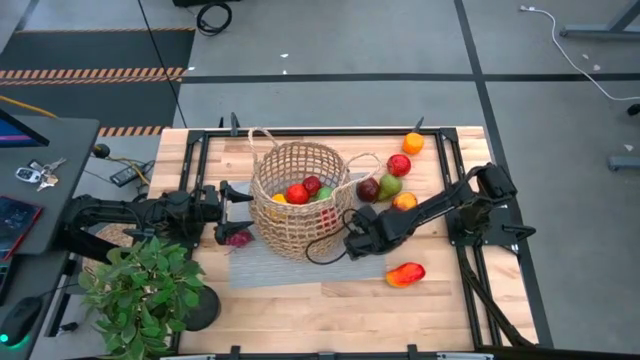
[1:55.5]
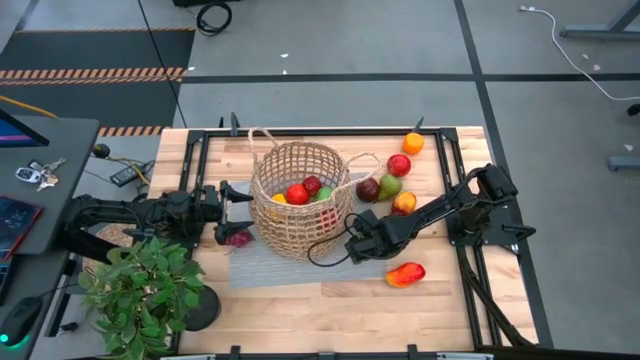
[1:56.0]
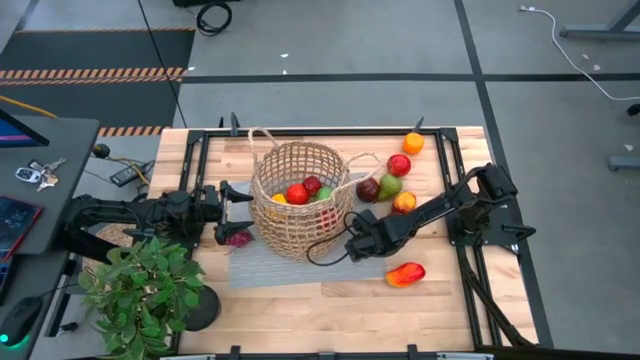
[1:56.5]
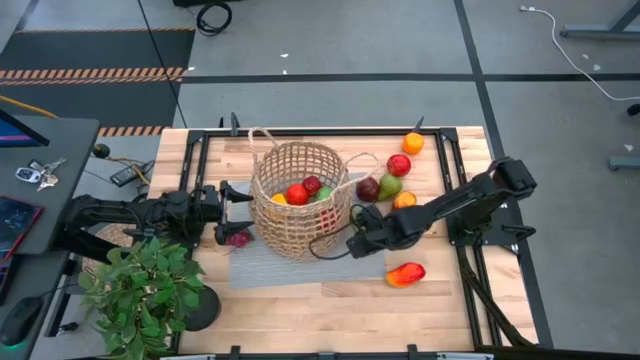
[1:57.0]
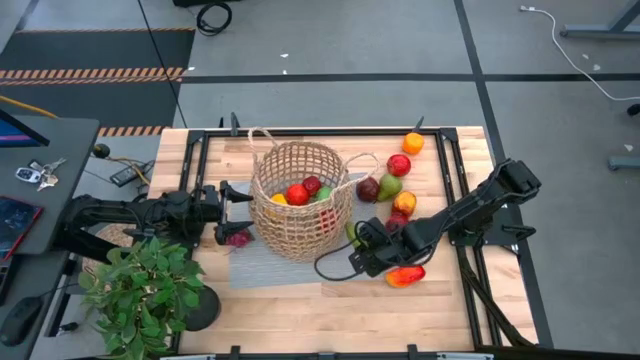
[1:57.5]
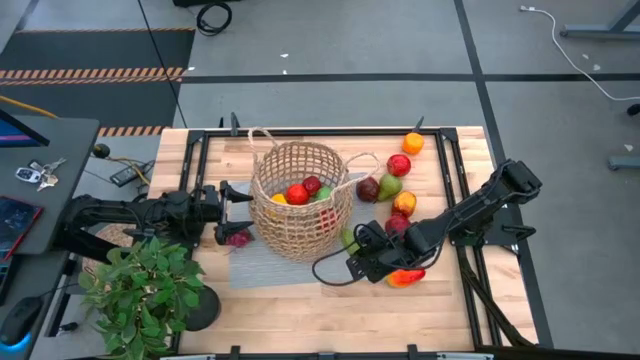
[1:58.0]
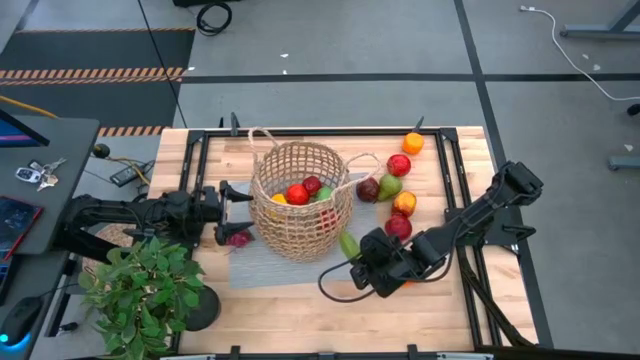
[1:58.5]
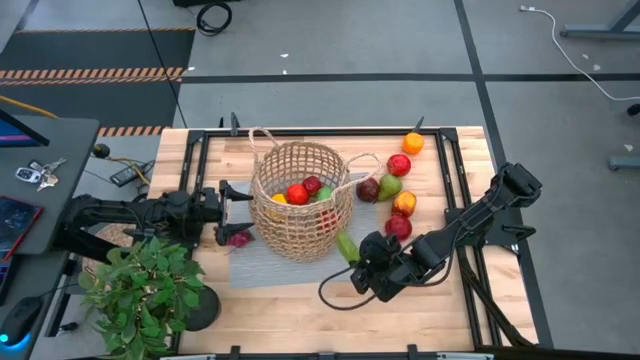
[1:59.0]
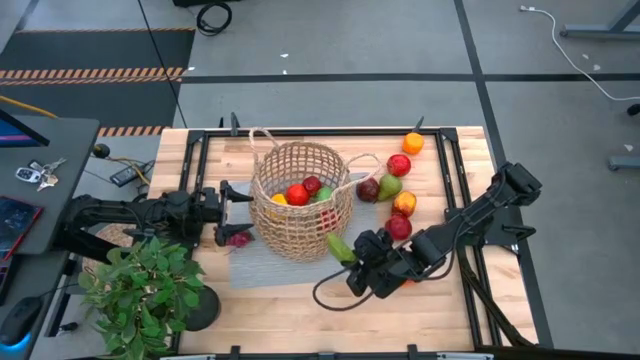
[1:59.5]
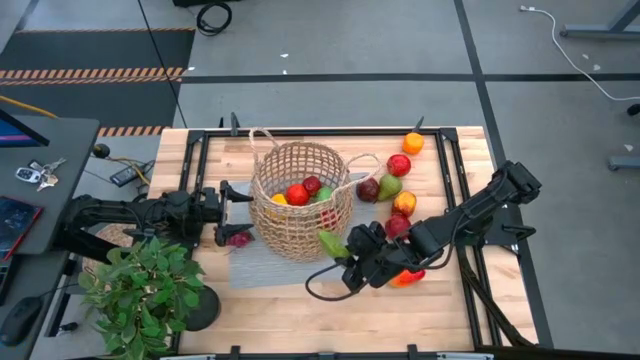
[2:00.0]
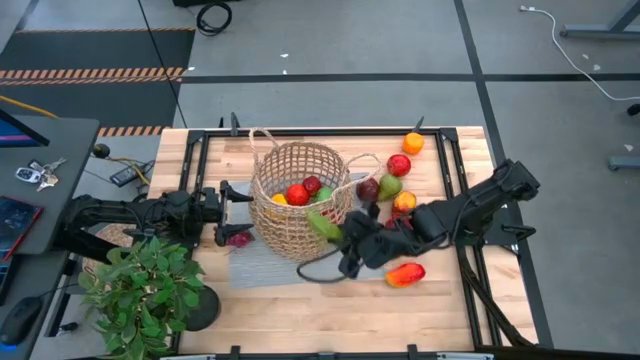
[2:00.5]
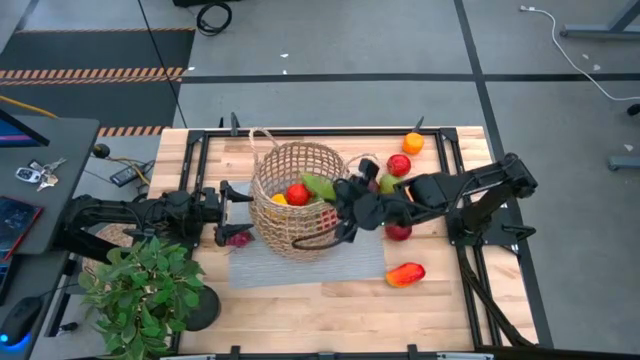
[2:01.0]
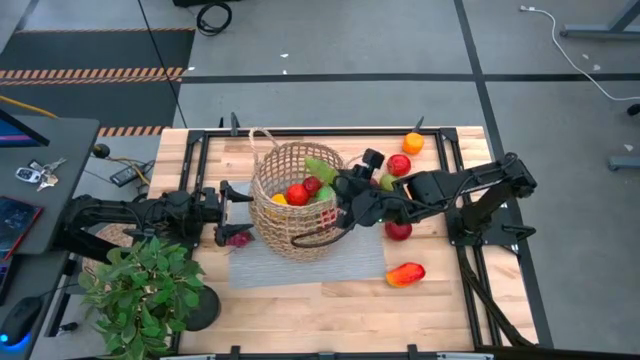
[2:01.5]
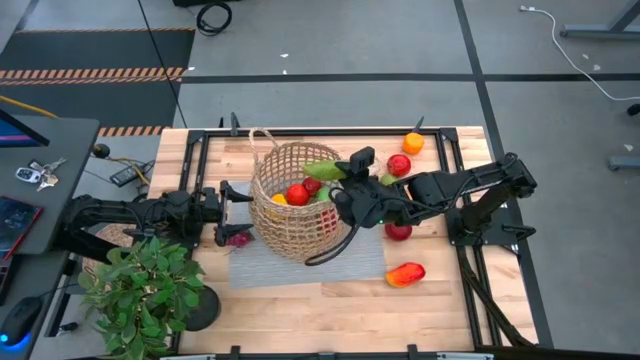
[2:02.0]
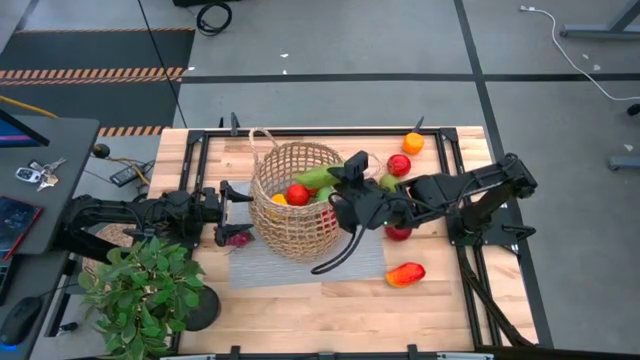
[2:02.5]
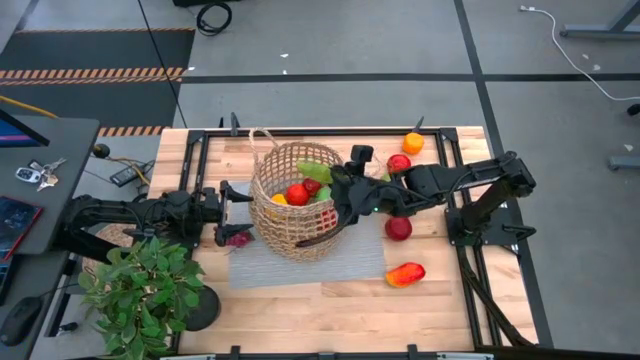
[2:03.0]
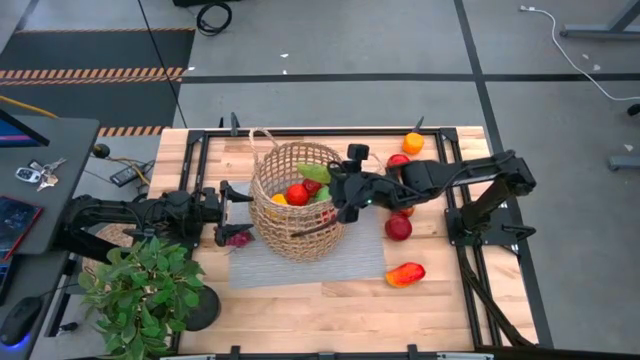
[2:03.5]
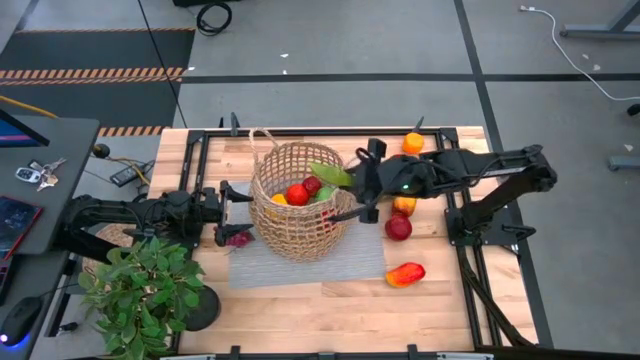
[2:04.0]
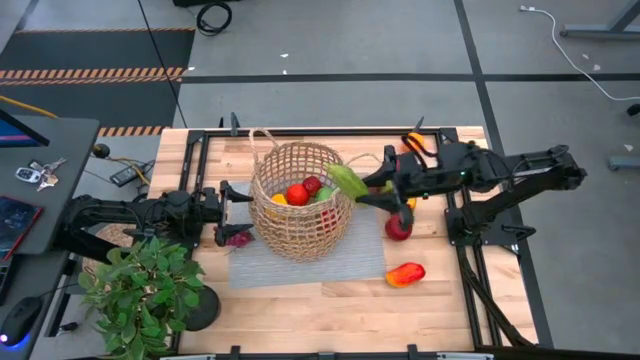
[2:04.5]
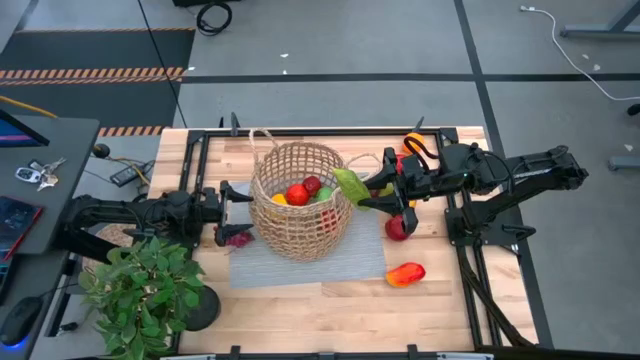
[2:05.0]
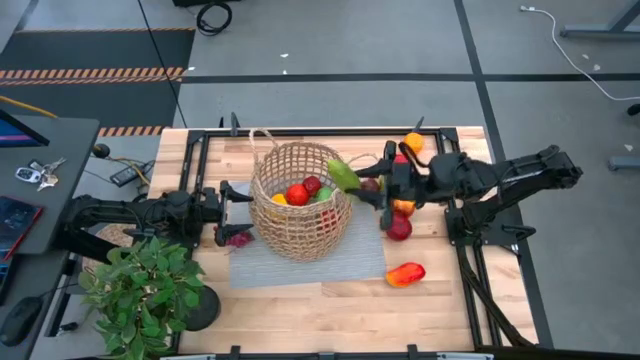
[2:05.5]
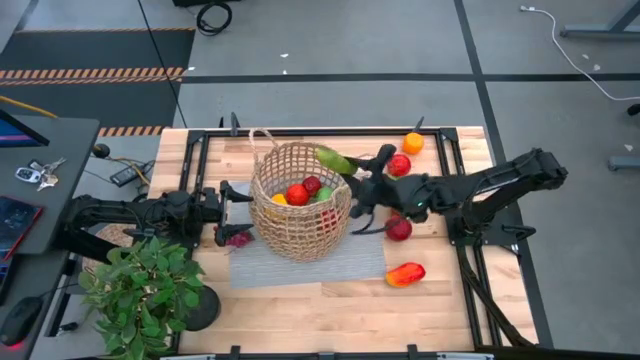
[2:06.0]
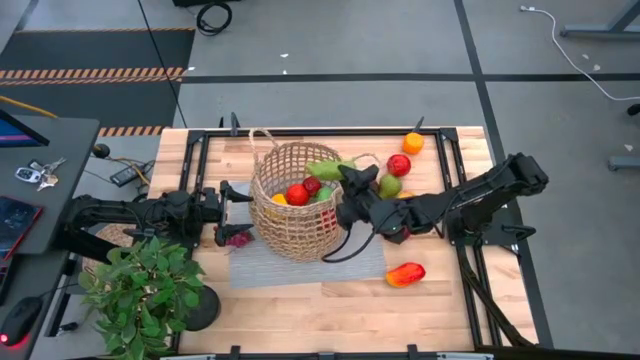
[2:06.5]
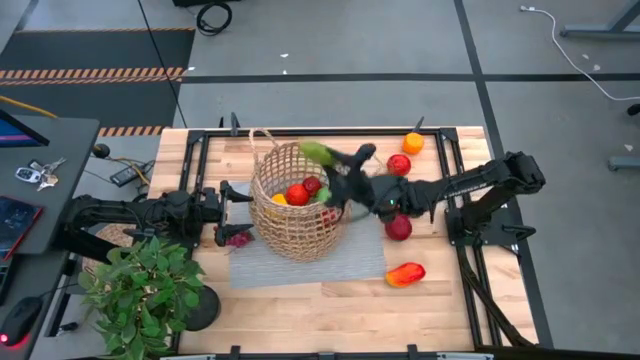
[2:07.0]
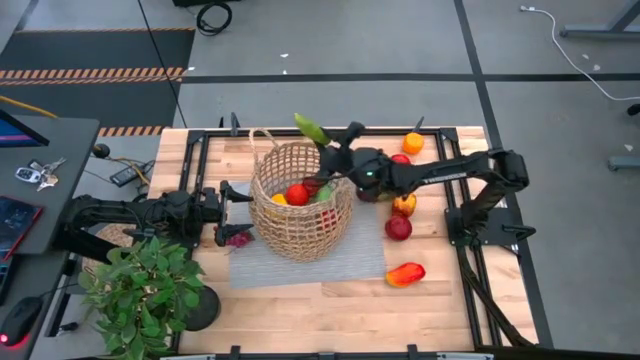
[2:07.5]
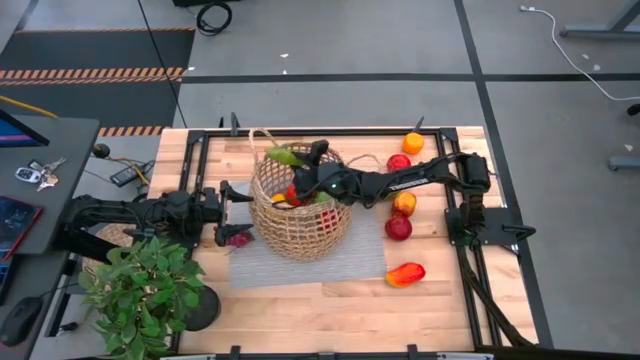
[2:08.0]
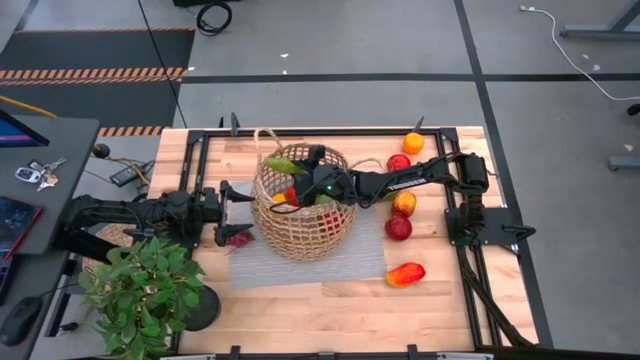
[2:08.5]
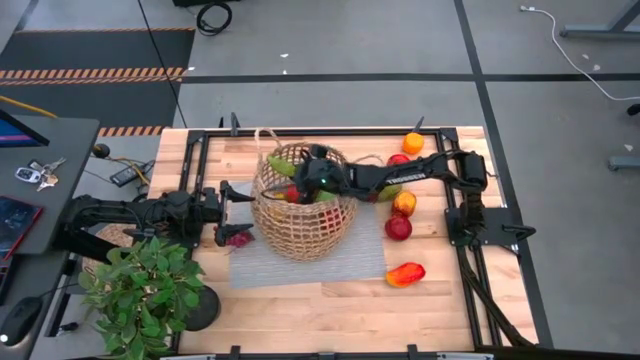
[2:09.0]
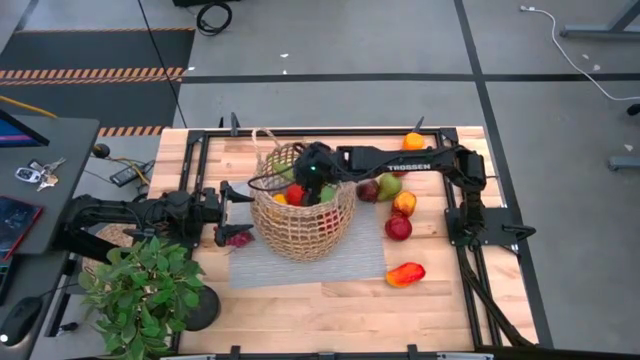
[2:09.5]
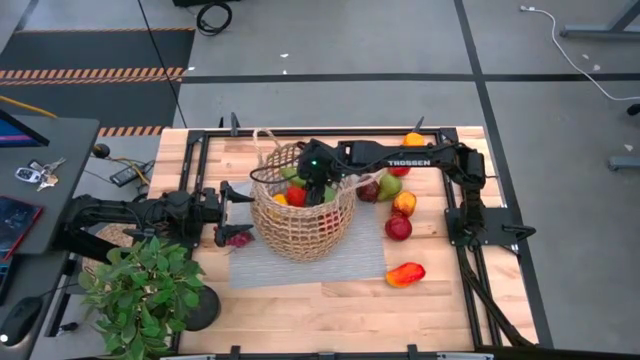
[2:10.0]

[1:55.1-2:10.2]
Task: Build produce basket
Put the green cucumber into the brown basket

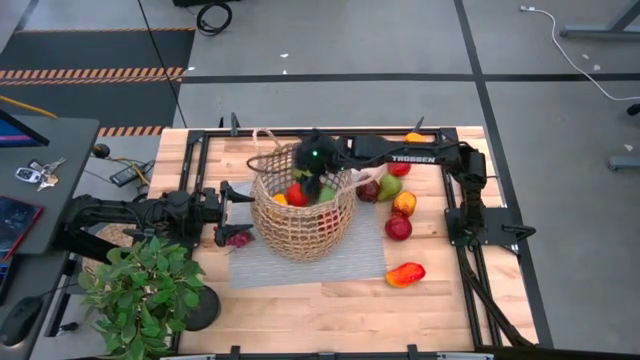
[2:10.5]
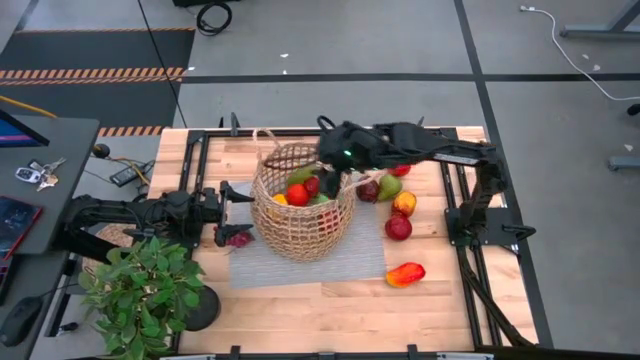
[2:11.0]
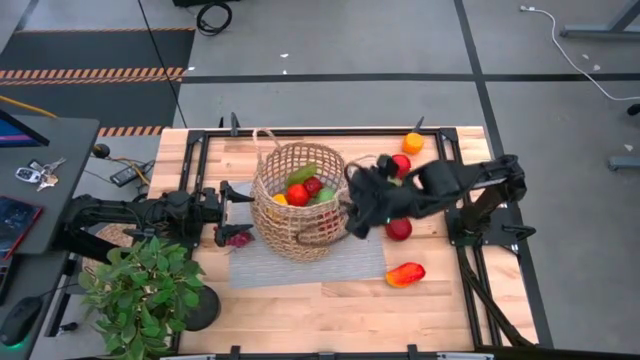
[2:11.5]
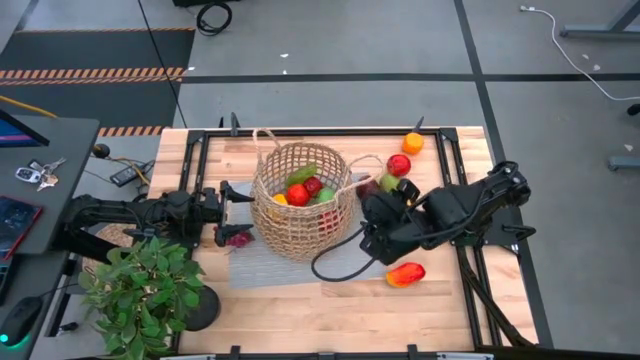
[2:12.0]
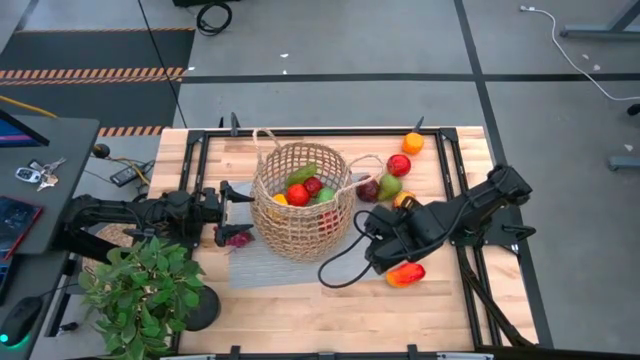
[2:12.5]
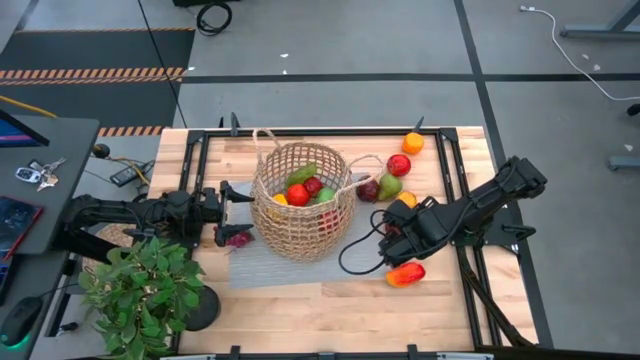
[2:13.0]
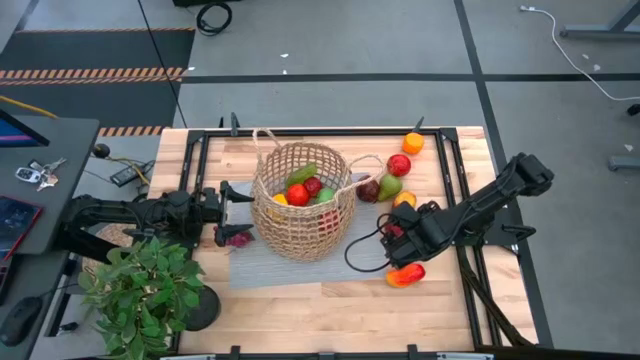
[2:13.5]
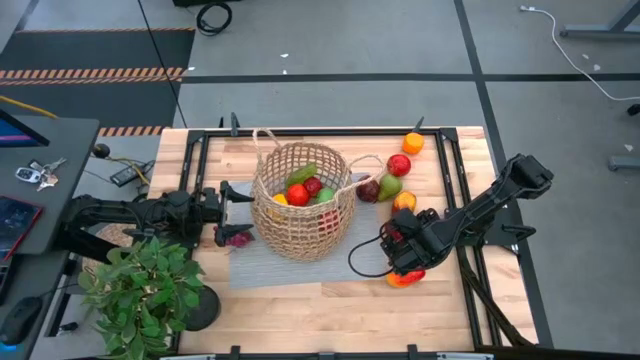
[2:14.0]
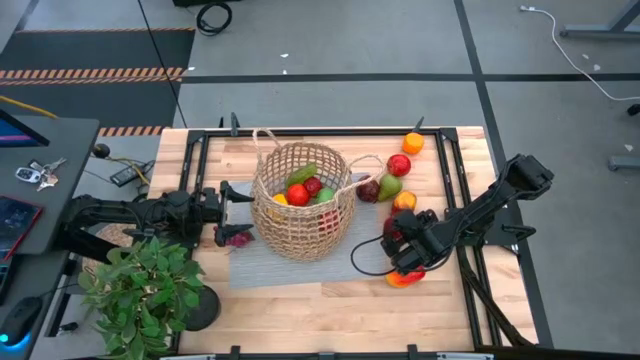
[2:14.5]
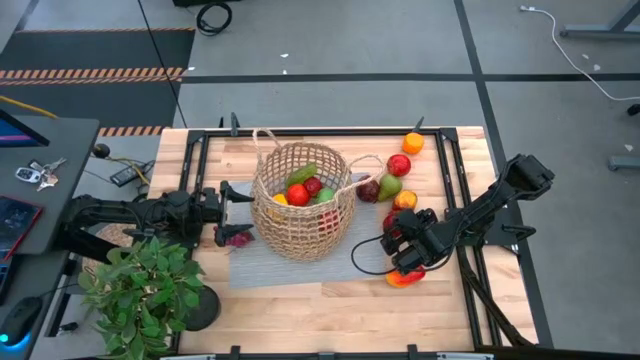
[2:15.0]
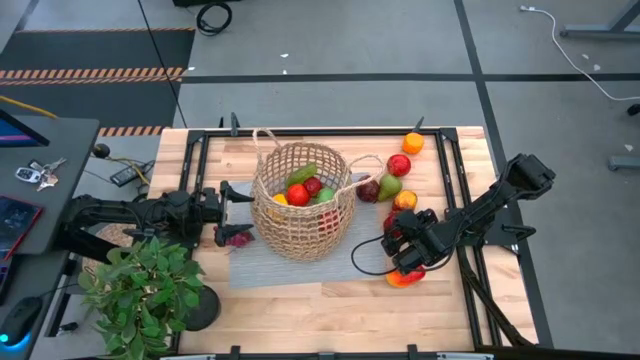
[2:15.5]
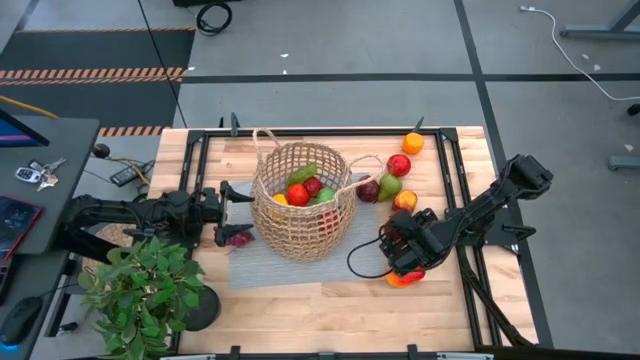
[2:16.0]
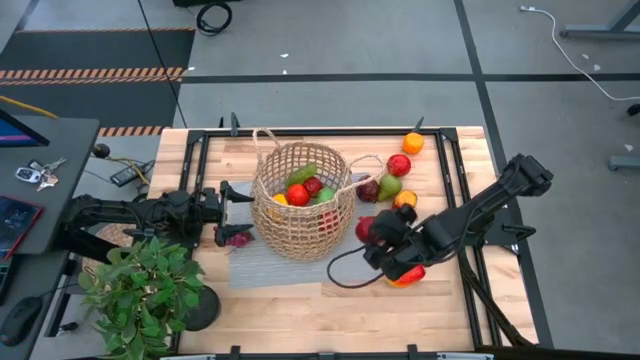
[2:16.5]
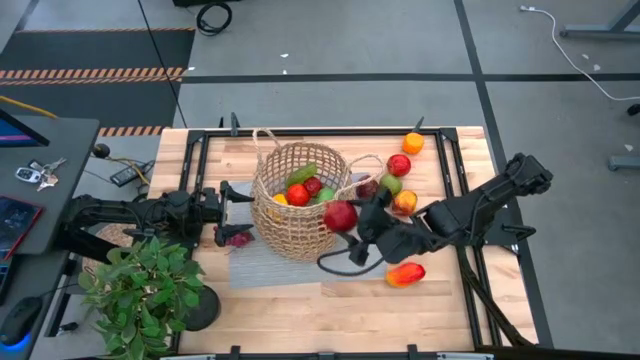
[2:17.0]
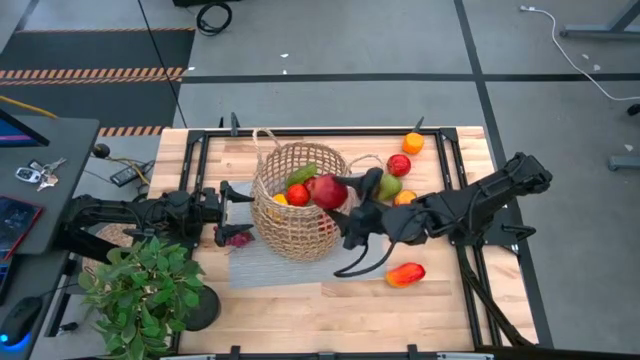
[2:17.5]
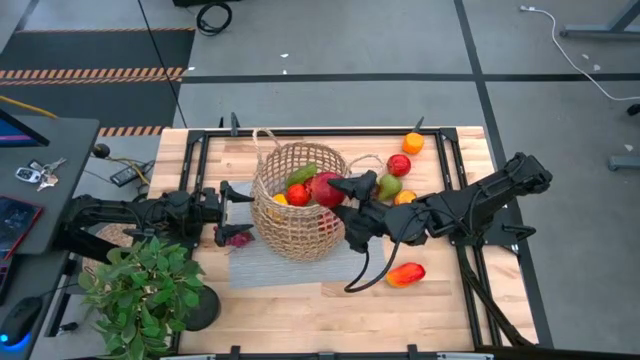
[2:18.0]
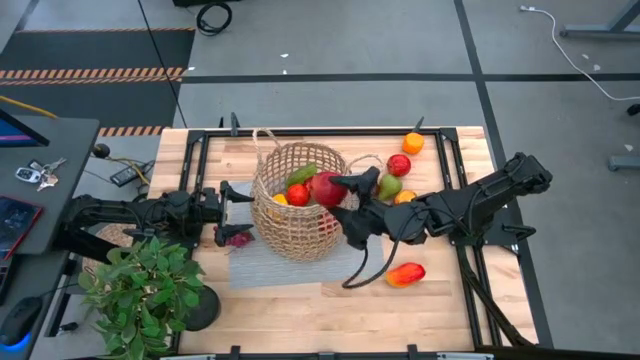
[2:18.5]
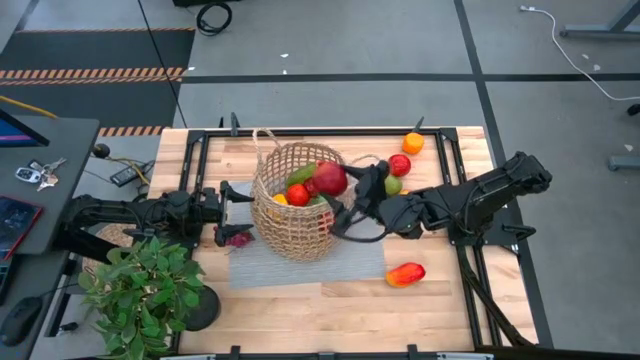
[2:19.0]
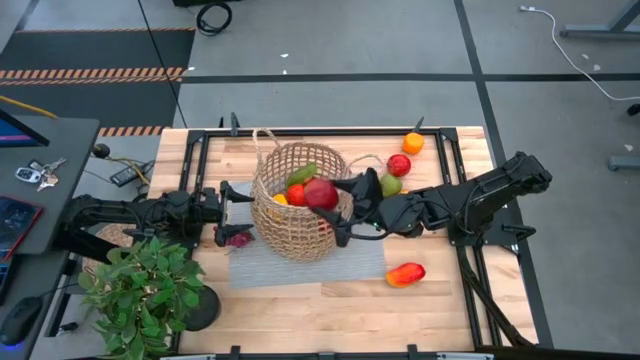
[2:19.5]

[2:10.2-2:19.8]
Put the red pomegranate into the brown basket
